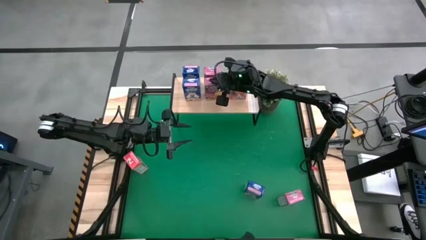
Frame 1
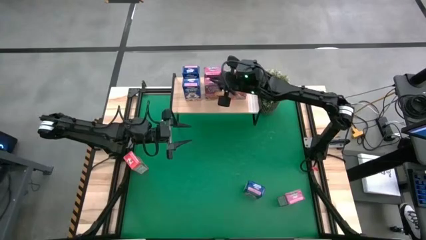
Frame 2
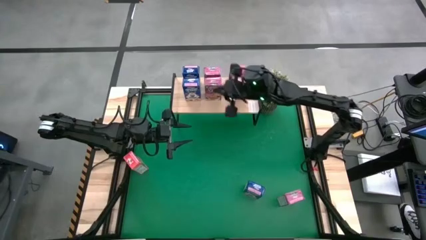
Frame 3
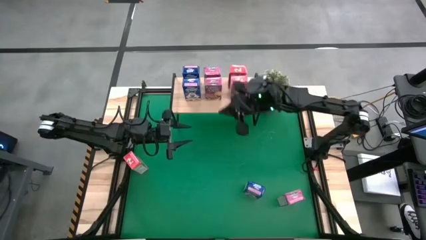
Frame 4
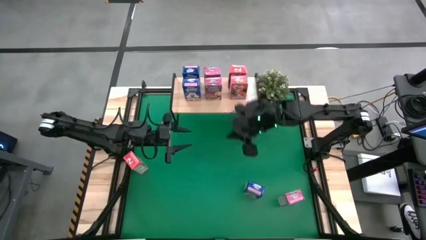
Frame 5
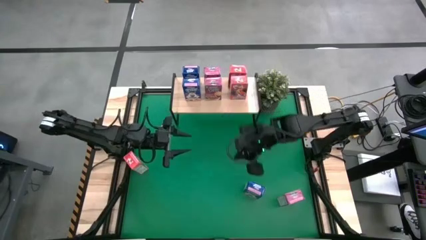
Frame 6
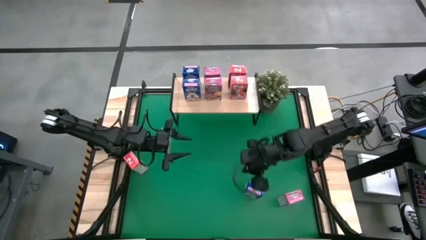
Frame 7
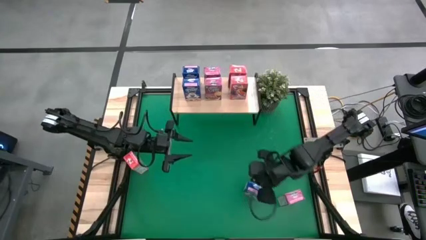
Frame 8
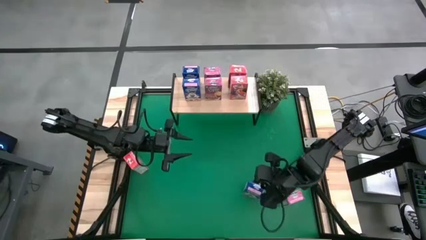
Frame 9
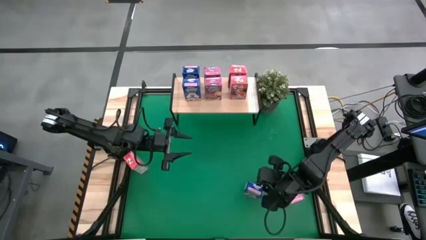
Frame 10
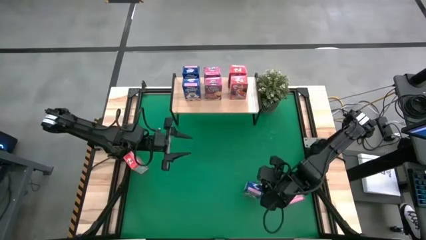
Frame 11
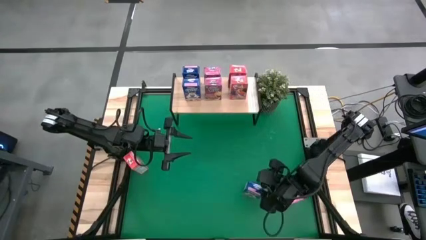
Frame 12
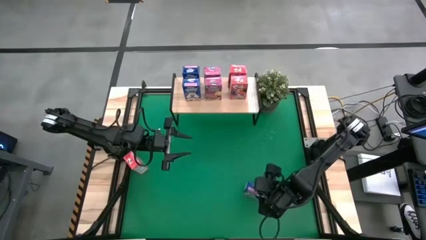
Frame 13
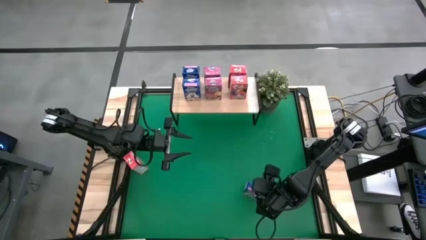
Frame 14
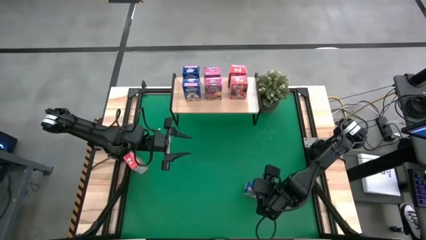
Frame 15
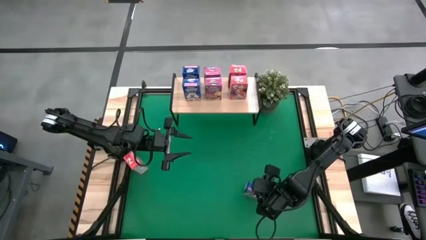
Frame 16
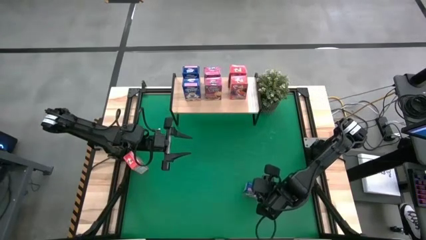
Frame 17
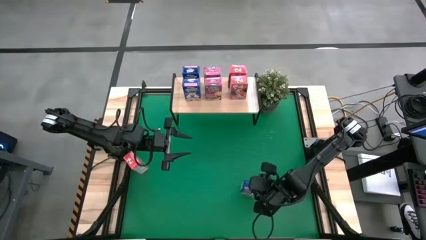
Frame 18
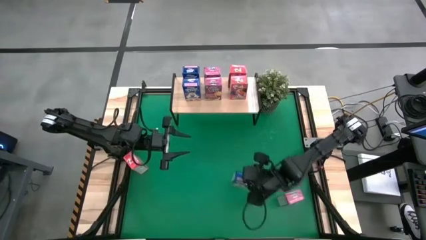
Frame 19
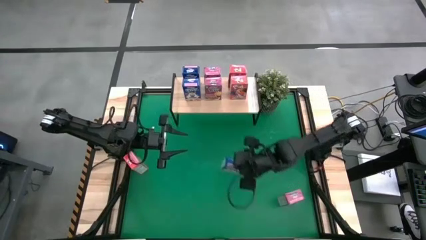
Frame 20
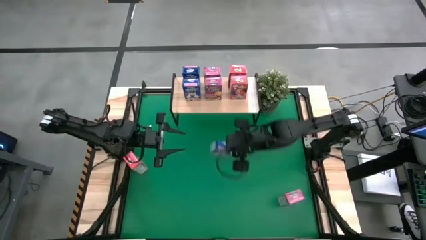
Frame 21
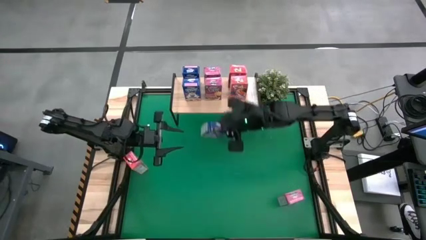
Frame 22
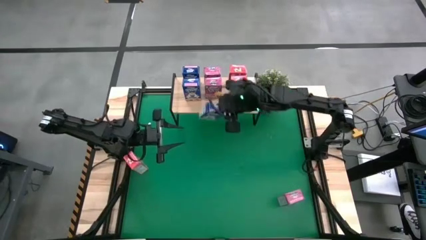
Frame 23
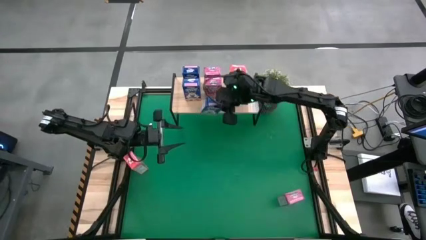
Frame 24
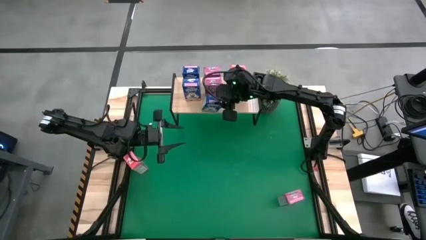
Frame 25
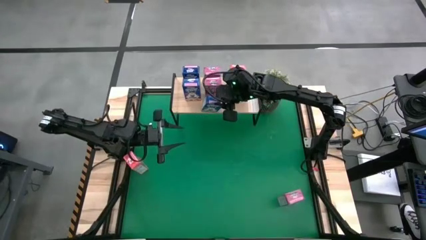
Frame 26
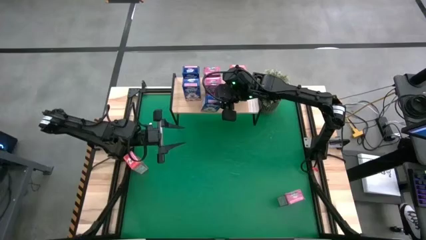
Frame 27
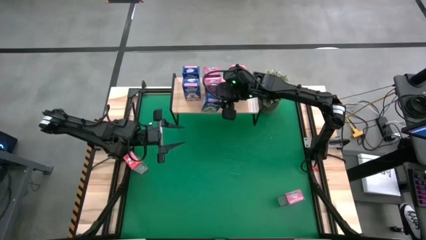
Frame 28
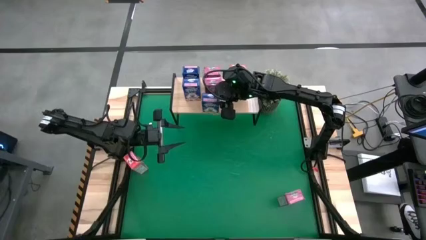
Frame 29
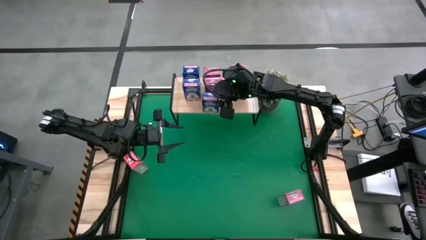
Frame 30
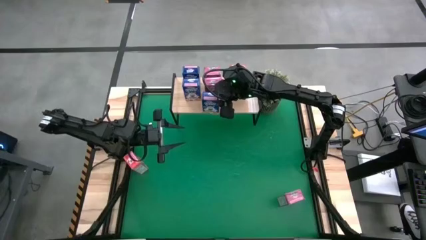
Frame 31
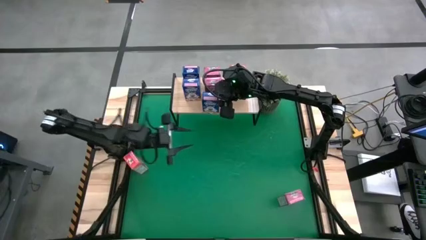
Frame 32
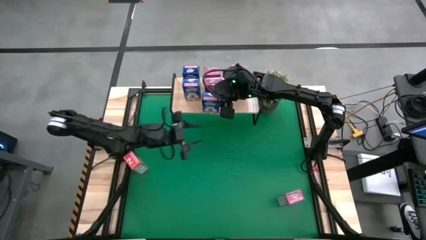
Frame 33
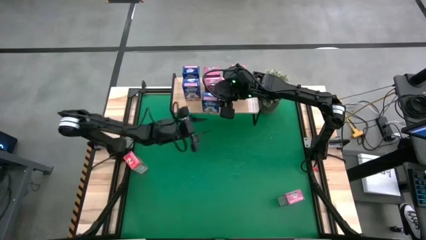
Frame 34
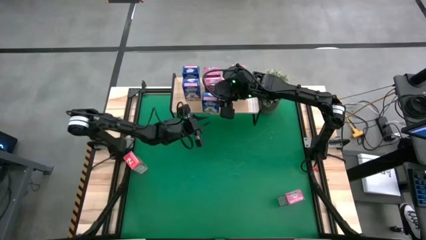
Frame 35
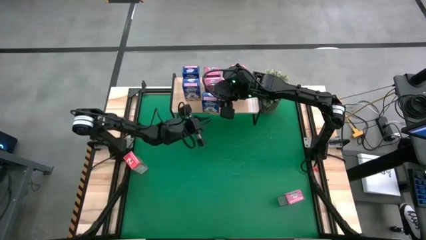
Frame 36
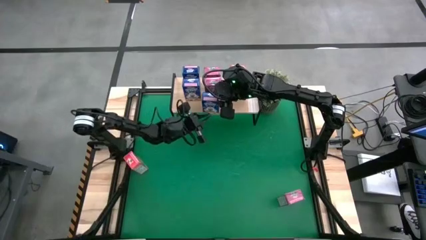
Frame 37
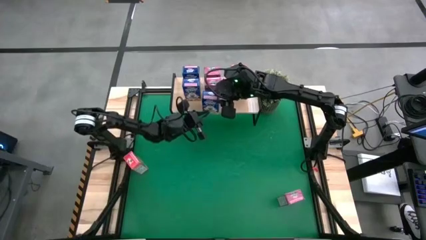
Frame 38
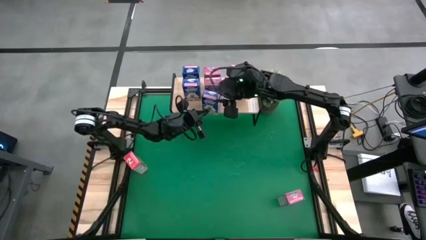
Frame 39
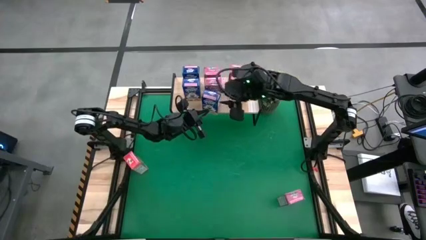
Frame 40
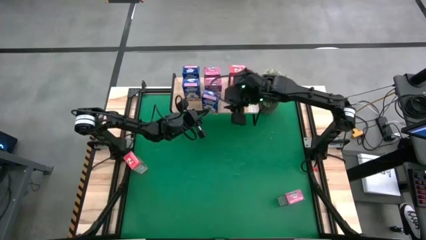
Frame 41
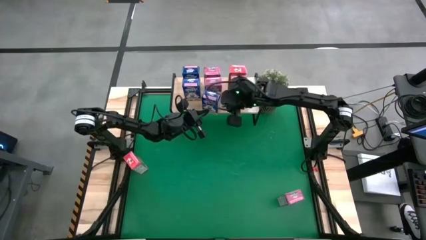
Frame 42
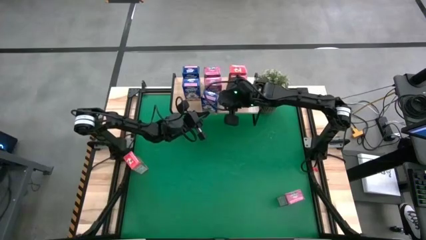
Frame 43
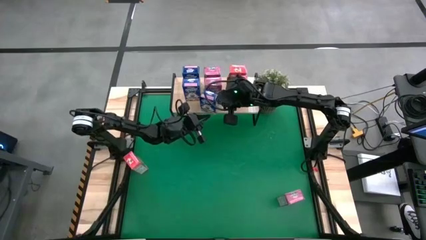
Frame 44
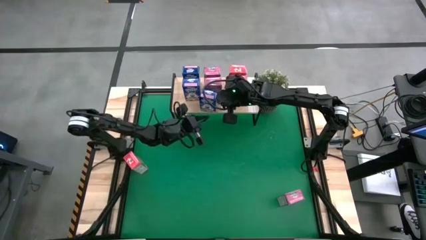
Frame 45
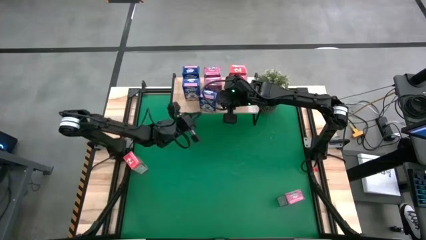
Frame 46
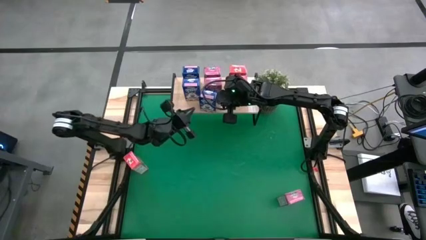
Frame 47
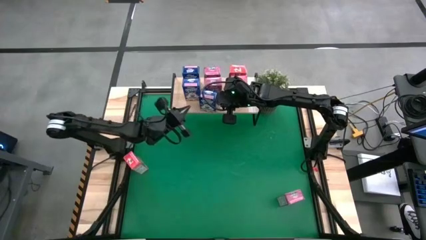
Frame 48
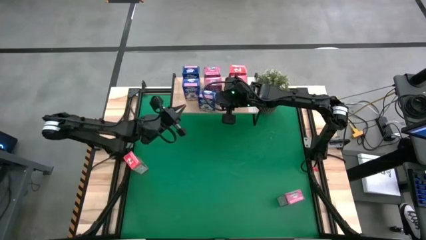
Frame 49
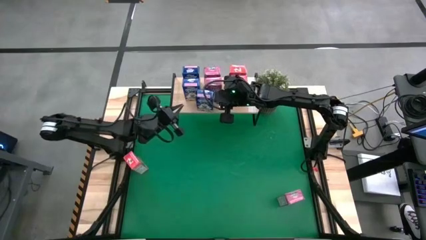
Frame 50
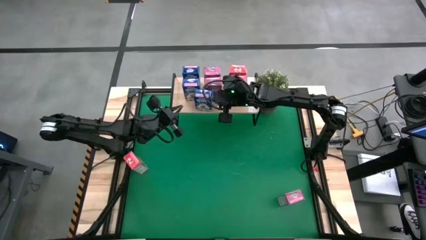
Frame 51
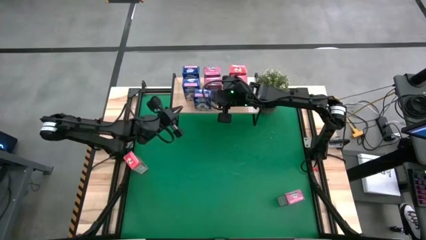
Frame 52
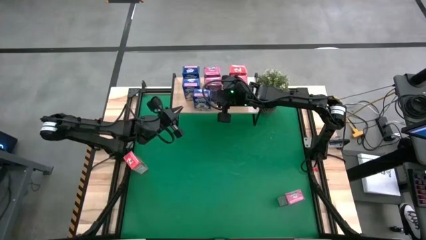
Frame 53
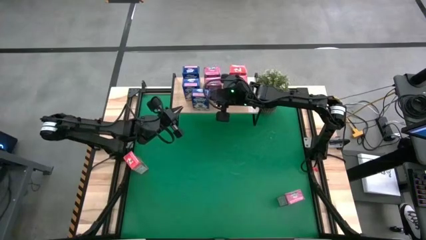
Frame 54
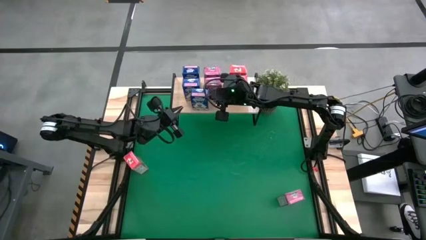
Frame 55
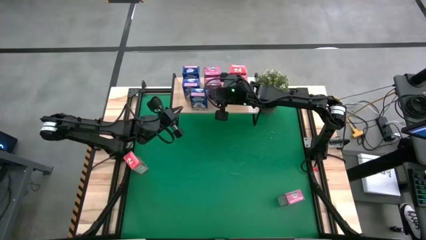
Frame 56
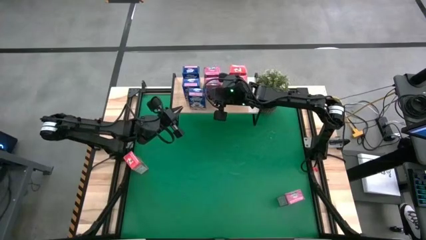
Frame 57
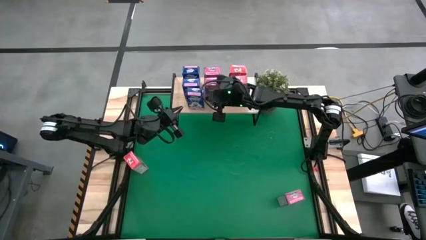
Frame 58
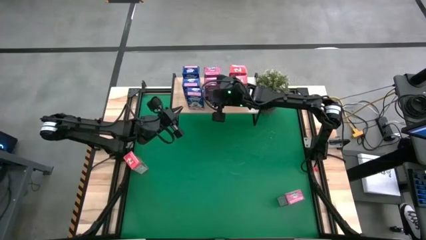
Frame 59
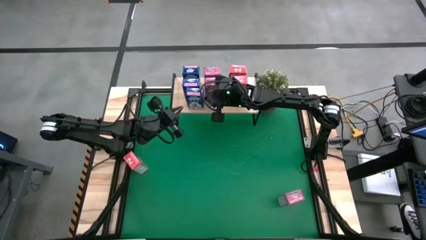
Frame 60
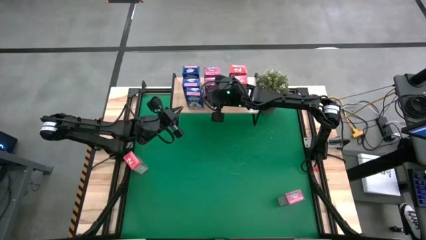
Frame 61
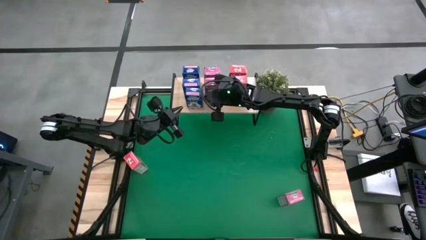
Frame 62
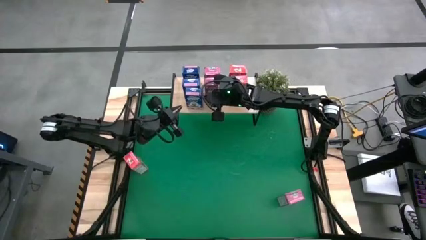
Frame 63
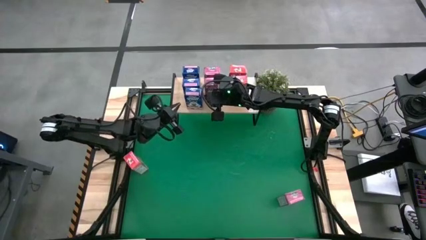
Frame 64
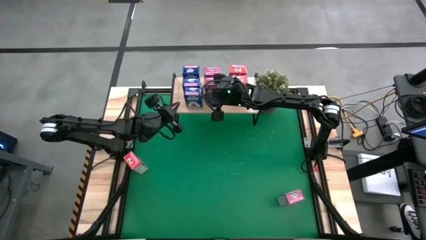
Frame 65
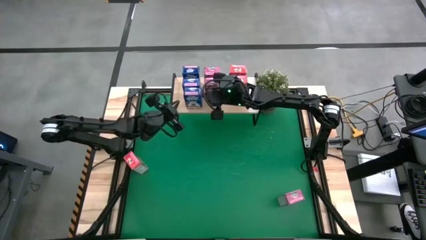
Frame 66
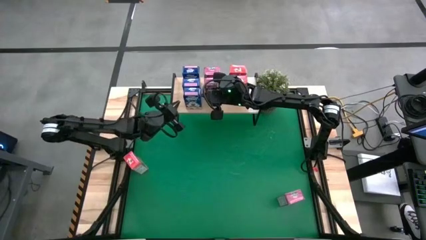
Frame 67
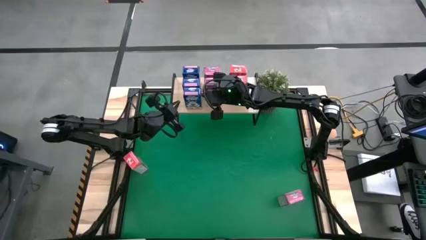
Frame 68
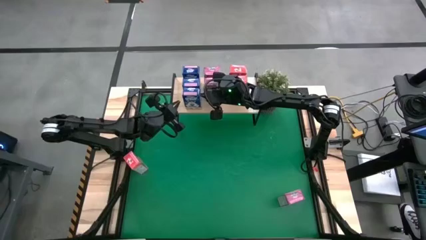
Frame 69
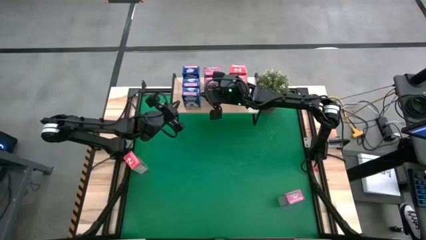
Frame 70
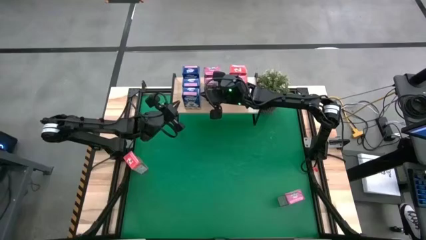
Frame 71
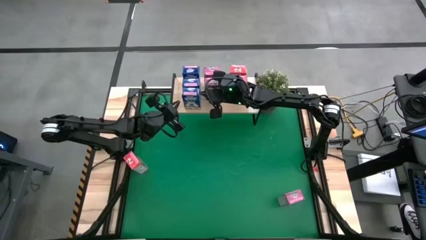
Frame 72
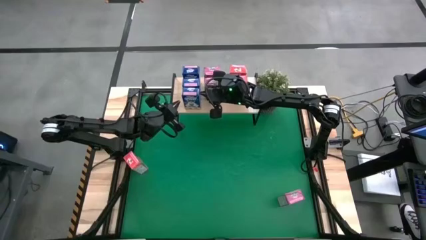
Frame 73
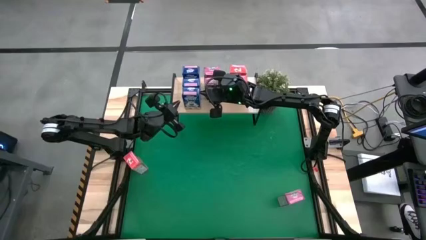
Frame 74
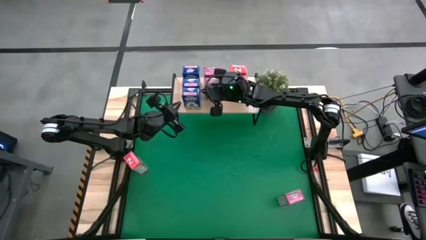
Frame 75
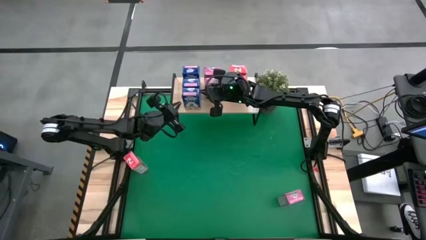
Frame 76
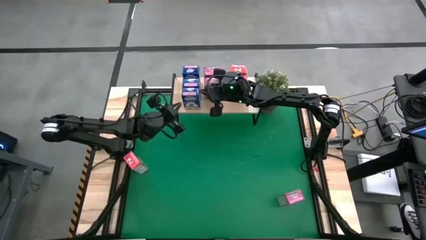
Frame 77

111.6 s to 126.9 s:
Task: Stack cereal on shelf
Put the blue cereal box on the shelf aligned with the blue cereal boxes

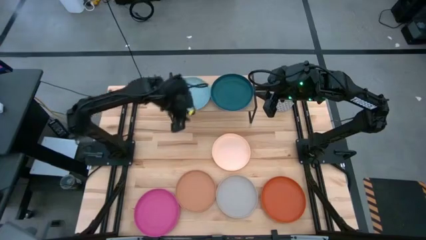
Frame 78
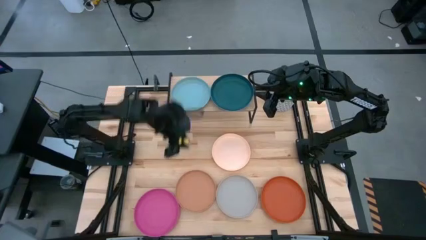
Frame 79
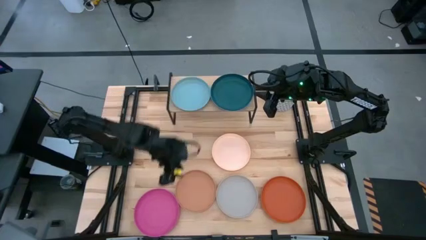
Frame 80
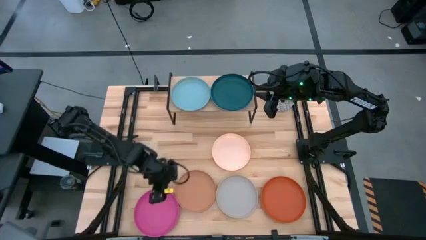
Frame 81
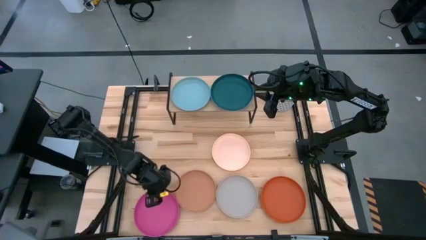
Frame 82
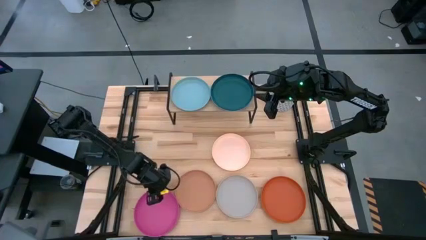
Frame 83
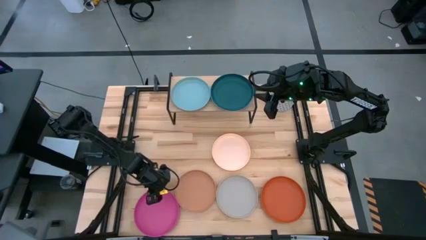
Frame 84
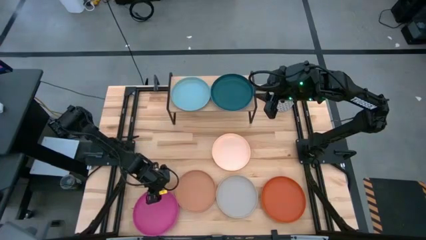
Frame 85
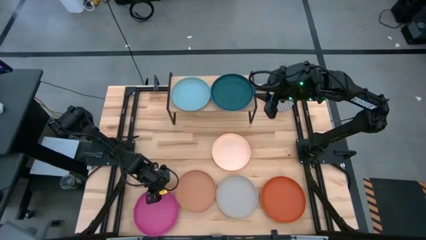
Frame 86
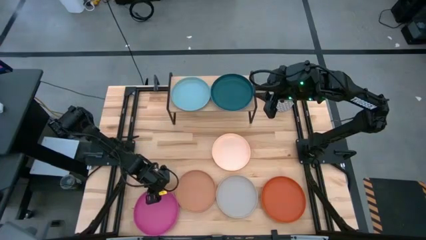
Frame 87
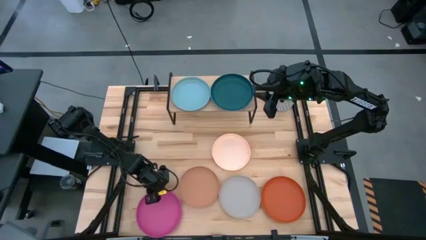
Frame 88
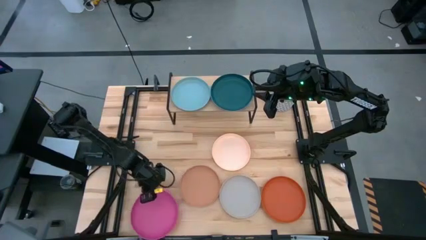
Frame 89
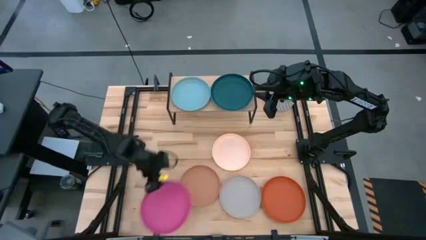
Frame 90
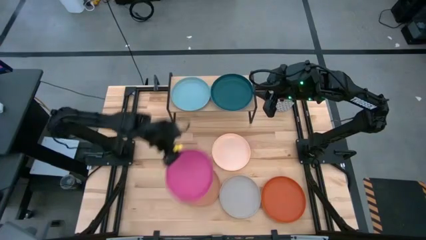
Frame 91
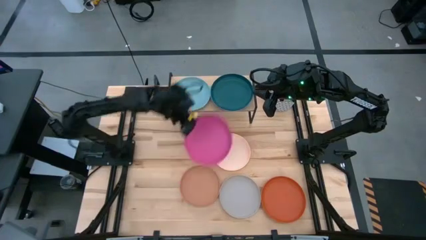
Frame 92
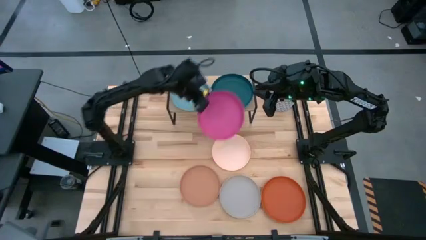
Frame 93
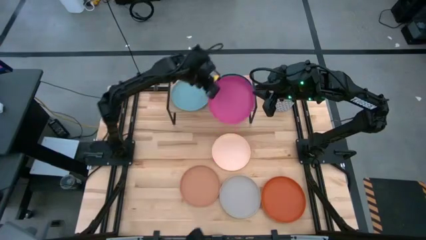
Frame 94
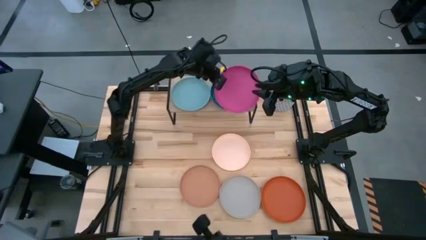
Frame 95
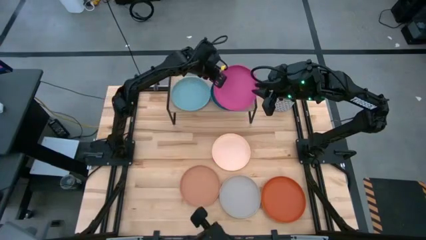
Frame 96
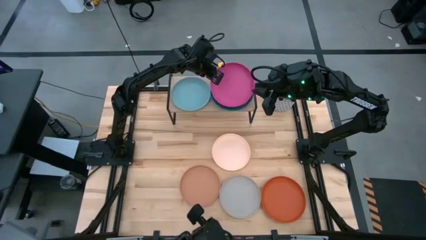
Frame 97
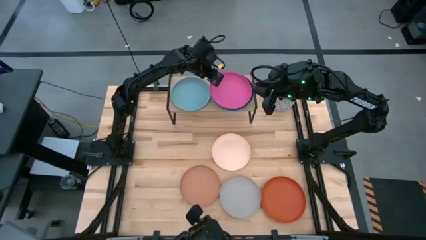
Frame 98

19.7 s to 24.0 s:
Task: Place and stack plates onto a shelf
Stack the pink plate on top of the dark green plate on the shelf
